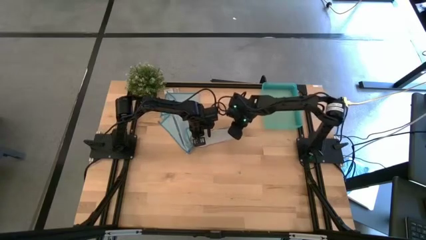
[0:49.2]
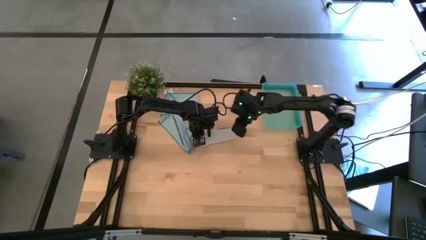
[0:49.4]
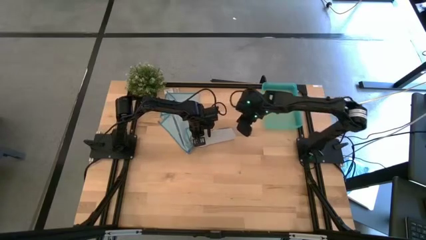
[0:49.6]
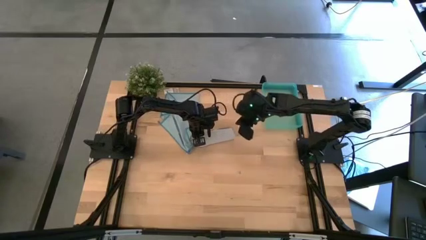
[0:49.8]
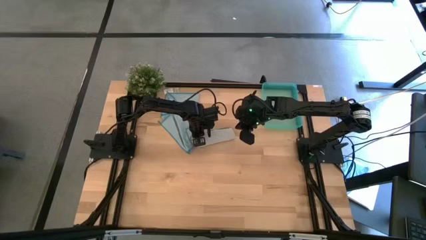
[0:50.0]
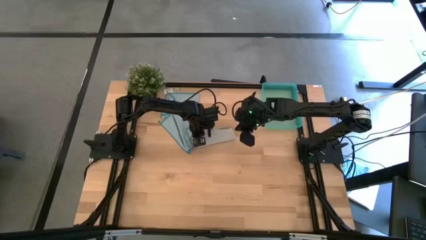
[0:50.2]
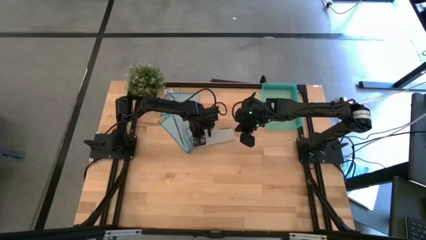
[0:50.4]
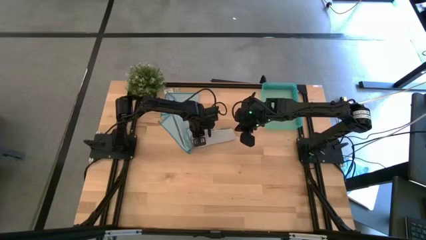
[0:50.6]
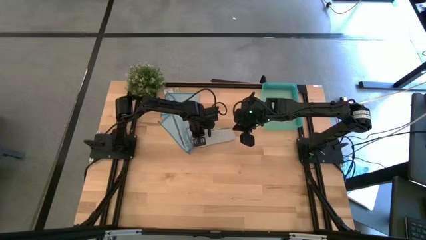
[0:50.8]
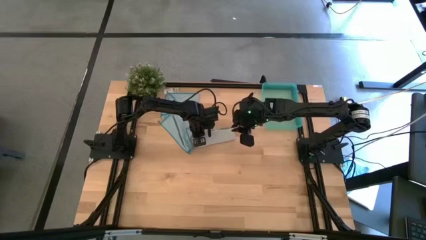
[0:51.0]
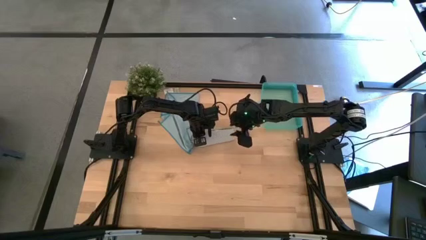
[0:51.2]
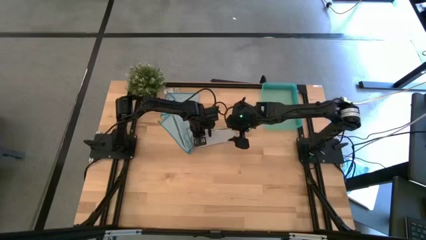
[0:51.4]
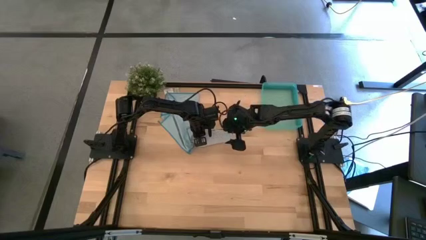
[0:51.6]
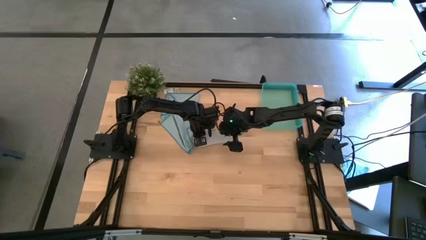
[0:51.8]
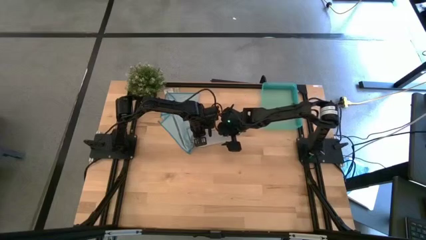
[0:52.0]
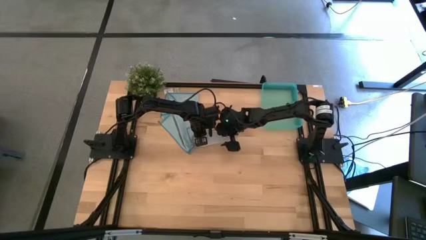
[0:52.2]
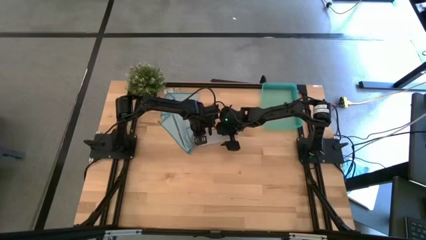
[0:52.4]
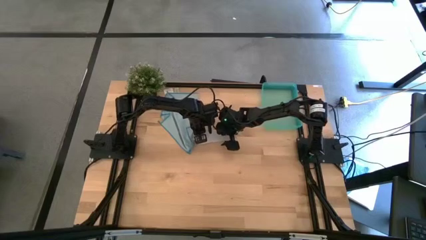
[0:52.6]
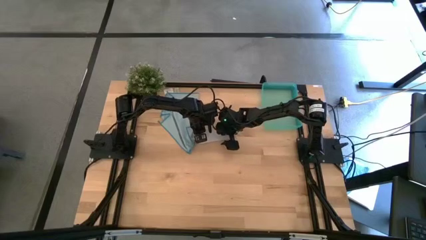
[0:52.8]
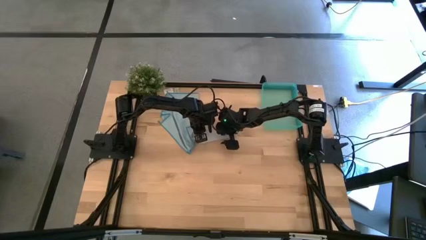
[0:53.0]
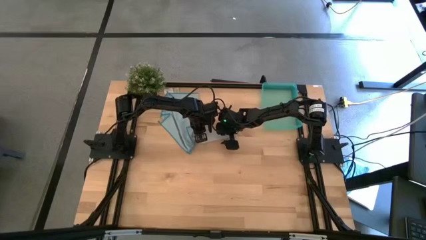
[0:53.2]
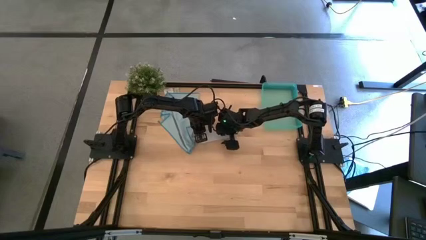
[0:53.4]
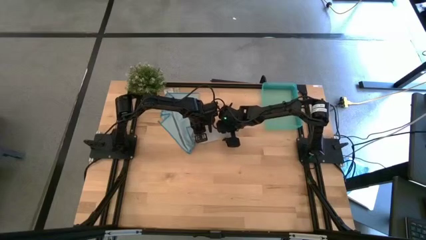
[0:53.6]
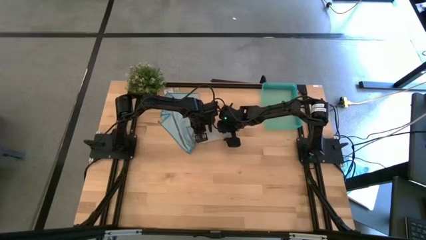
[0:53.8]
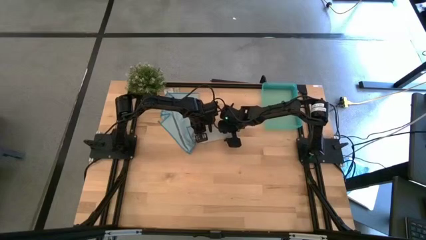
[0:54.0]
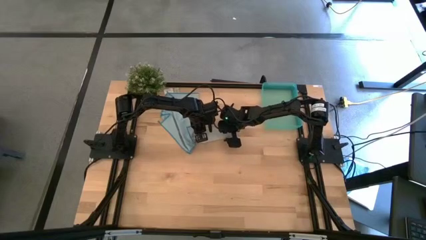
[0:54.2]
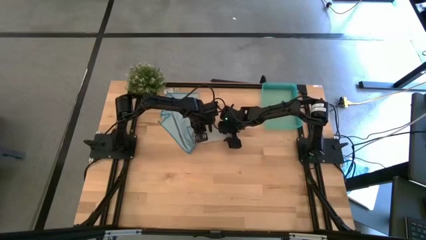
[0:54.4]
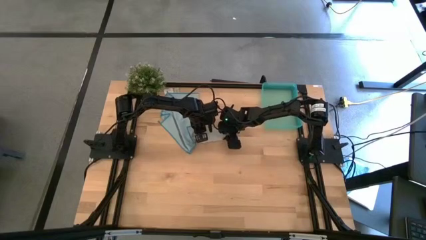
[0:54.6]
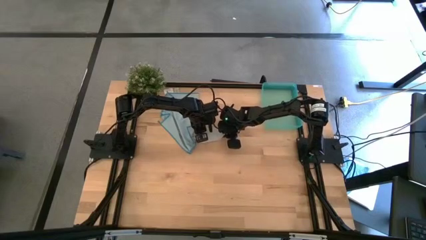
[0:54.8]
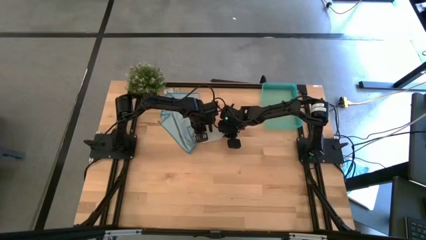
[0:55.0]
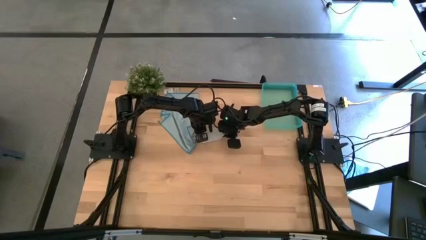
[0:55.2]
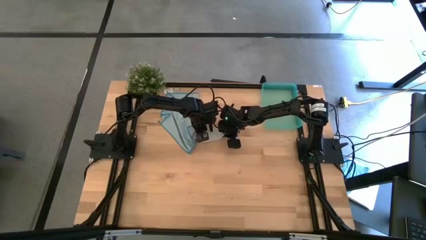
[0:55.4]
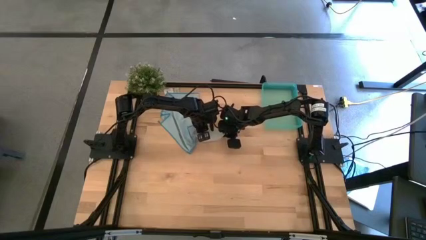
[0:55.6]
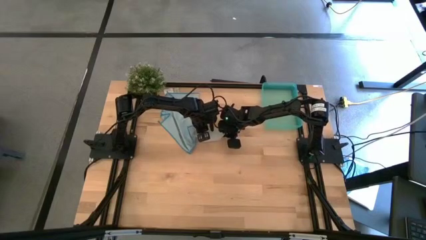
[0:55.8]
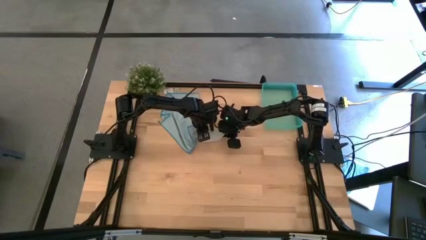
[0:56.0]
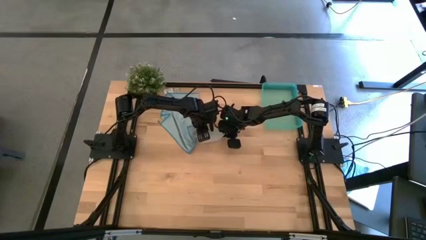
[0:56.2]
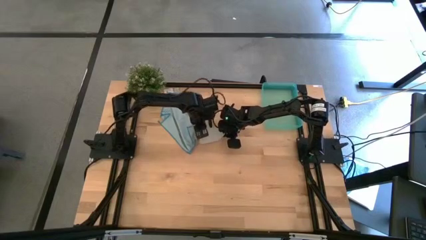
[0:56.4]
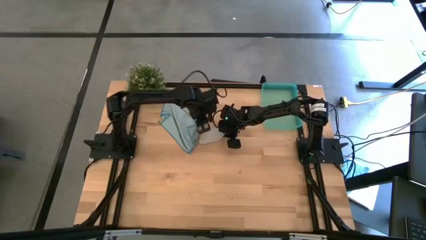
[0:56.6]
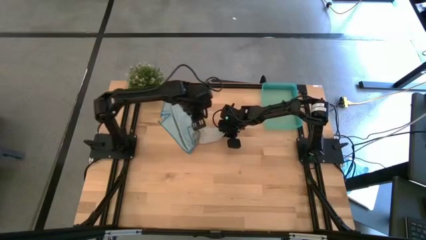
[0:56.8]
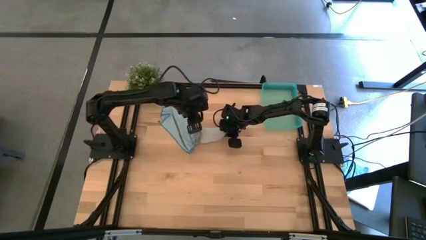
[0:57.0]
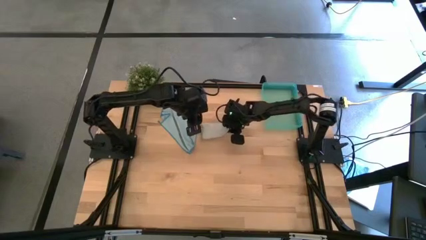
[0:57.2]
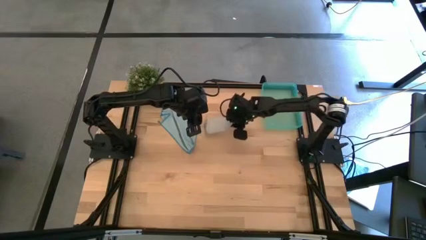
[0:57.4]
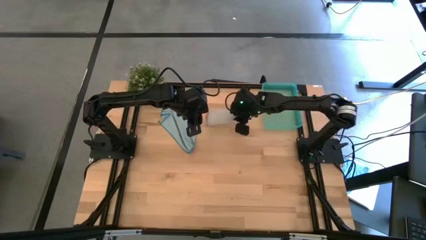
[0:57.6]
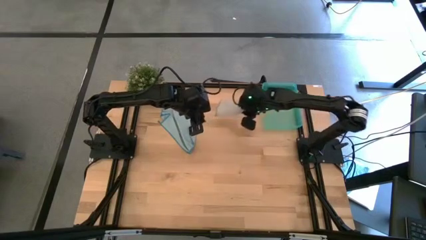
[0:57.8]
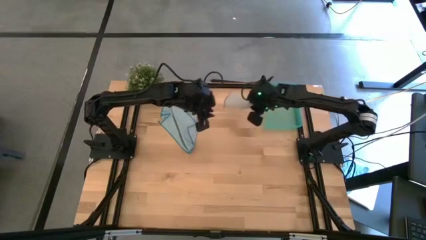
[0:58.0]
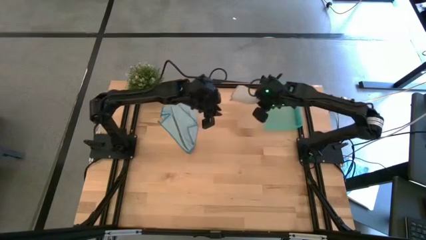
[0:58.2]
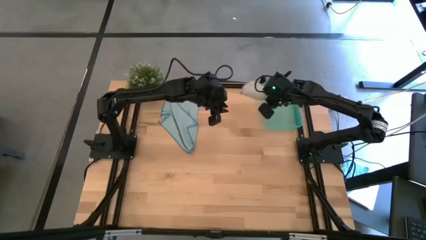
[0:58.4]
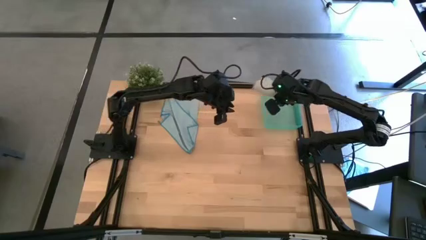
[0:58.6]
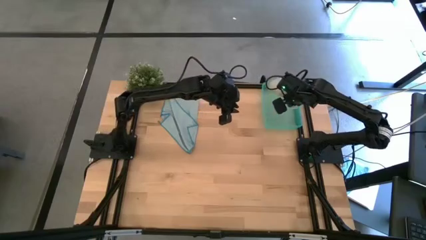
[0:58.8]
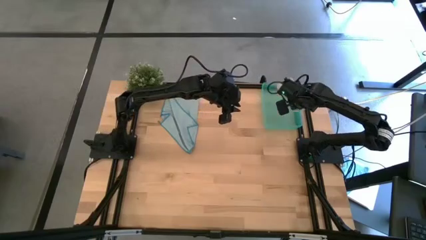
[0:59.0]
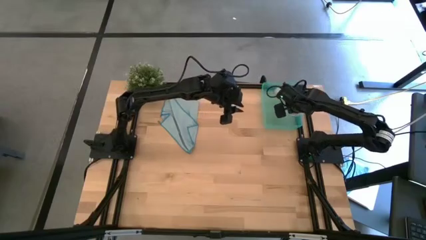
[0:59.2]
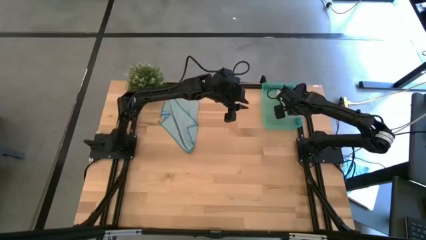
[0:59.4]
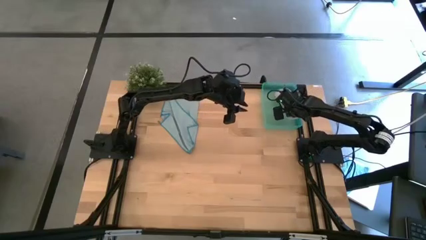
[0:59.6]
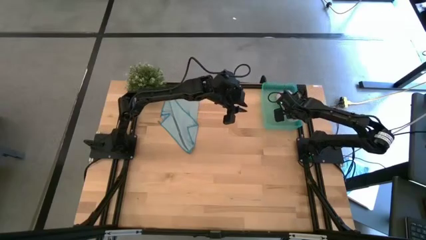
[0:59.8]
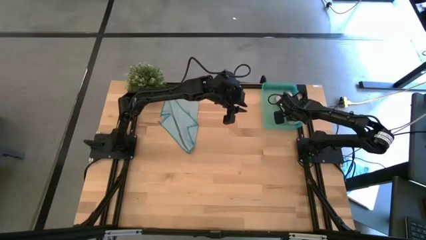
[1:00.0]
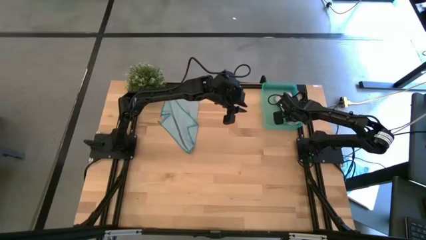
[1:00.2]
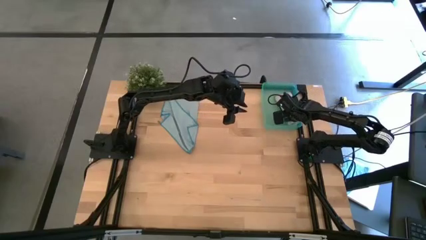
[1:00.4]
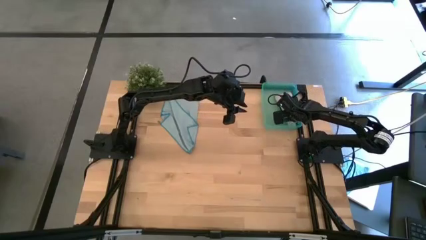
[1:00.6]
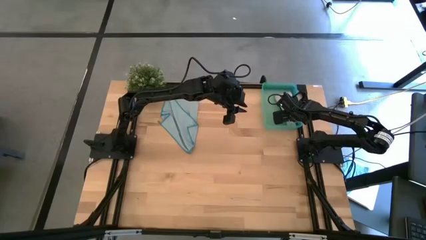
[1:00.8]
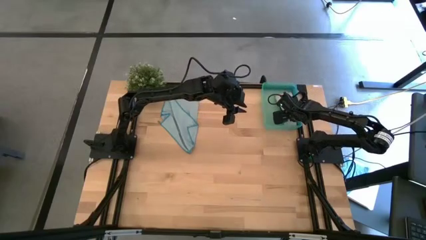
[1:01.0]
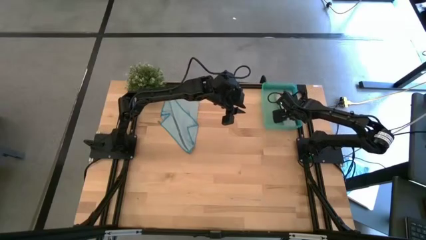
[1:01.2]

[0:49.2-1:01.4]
Task: Roll microfiber towels into tight, uniform cylinder then place into a basket
Put the gray towel into the green bin
